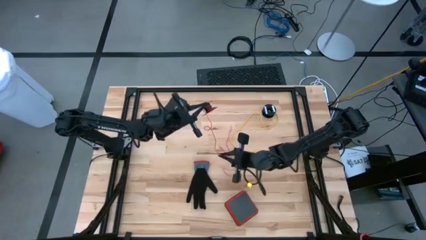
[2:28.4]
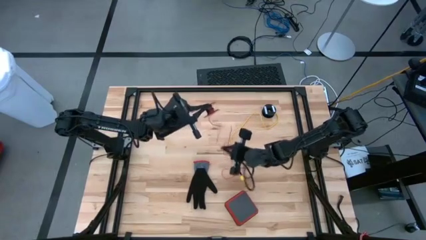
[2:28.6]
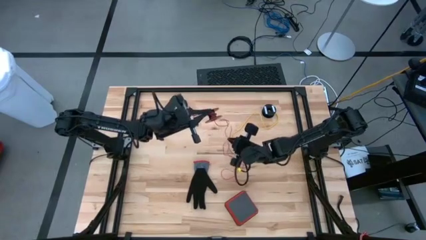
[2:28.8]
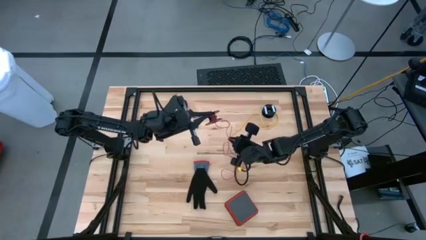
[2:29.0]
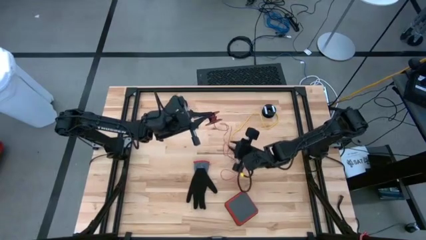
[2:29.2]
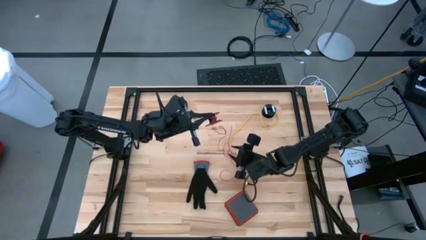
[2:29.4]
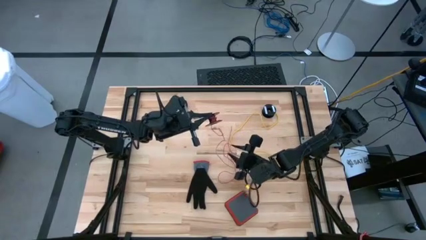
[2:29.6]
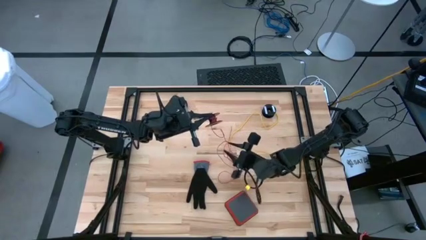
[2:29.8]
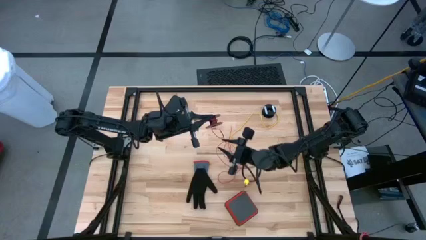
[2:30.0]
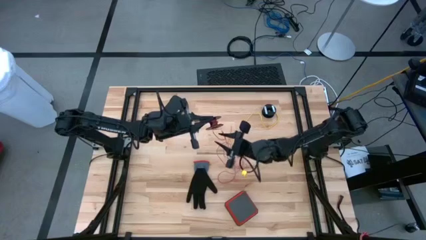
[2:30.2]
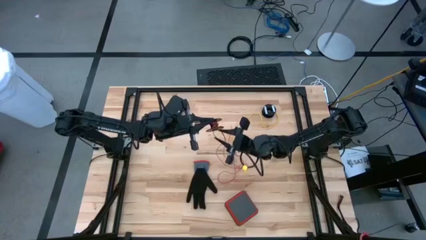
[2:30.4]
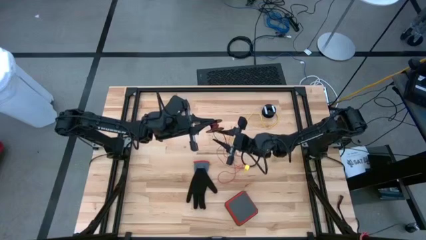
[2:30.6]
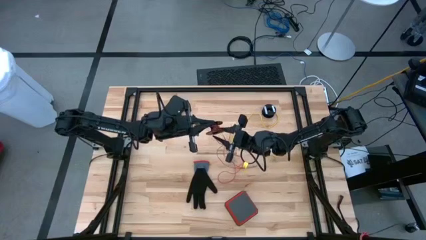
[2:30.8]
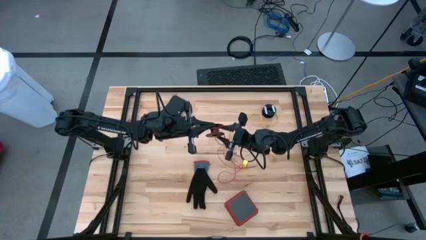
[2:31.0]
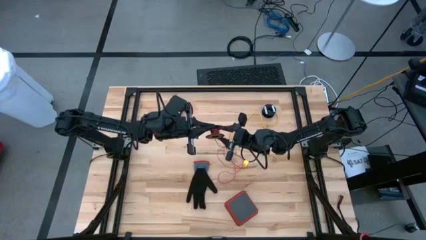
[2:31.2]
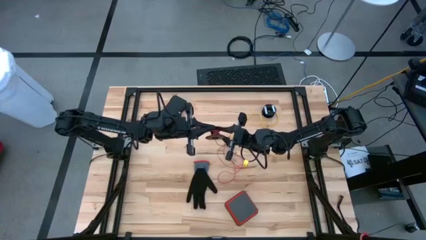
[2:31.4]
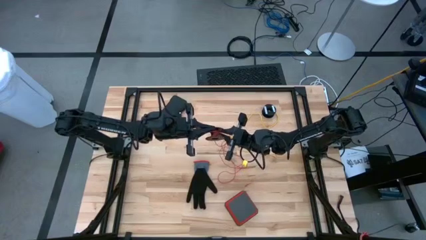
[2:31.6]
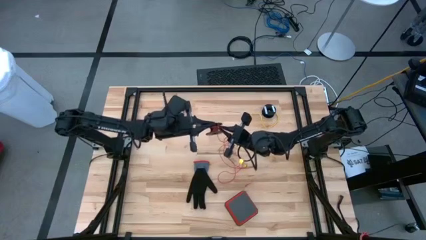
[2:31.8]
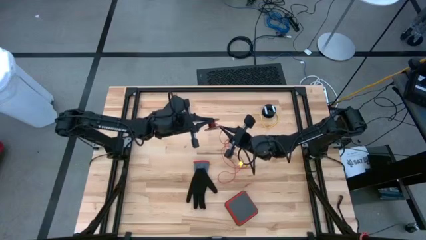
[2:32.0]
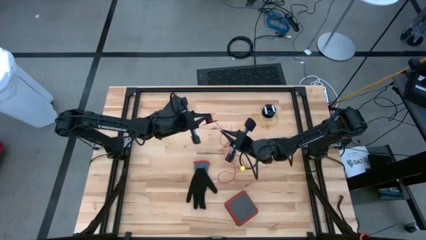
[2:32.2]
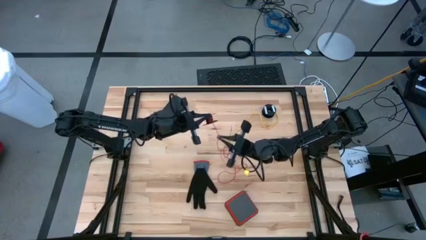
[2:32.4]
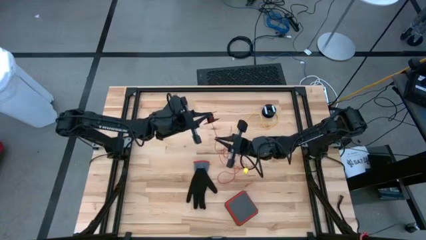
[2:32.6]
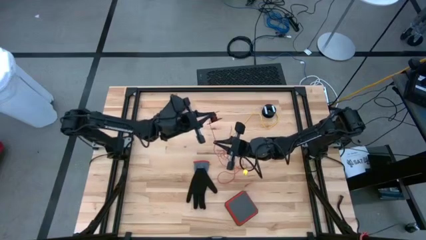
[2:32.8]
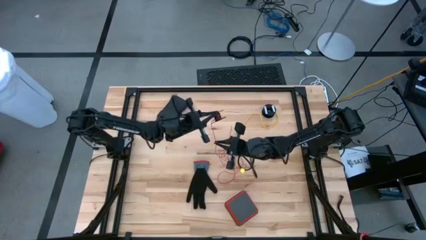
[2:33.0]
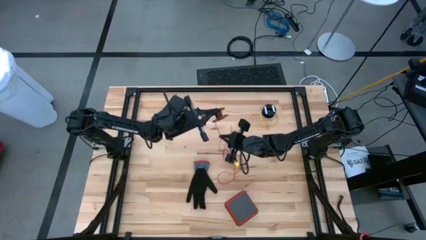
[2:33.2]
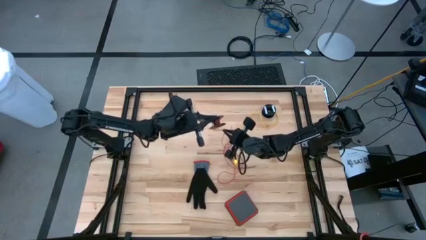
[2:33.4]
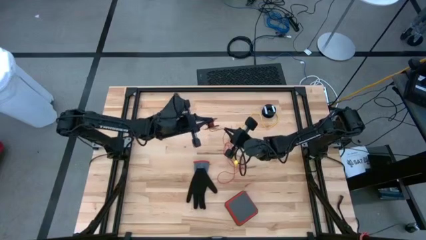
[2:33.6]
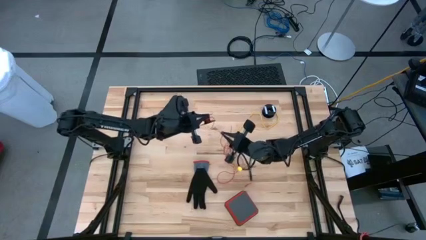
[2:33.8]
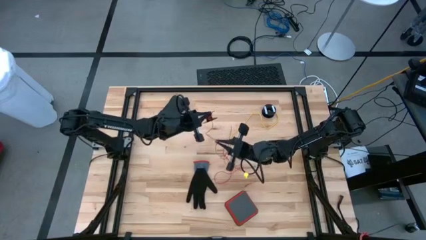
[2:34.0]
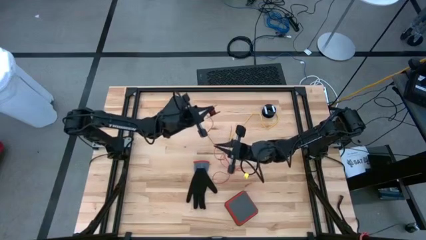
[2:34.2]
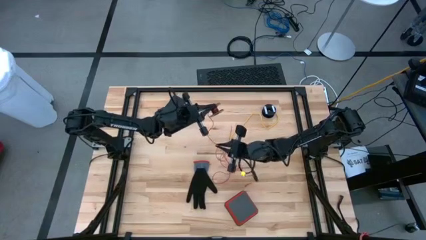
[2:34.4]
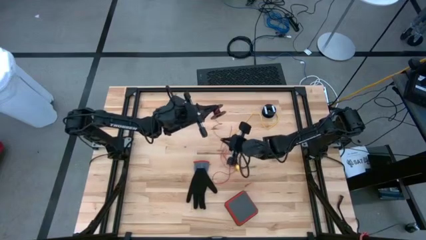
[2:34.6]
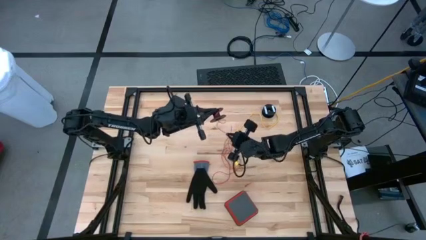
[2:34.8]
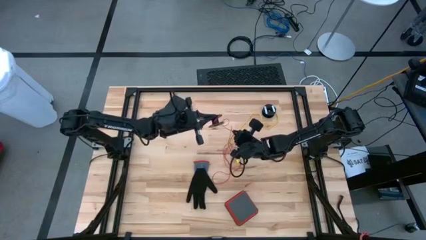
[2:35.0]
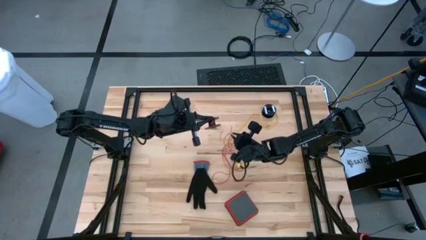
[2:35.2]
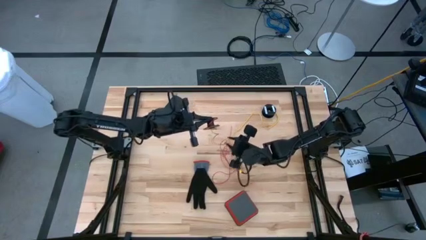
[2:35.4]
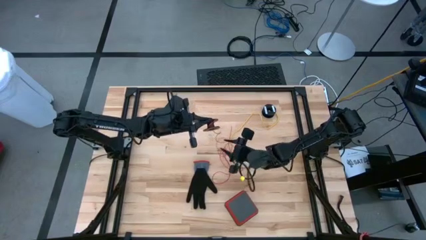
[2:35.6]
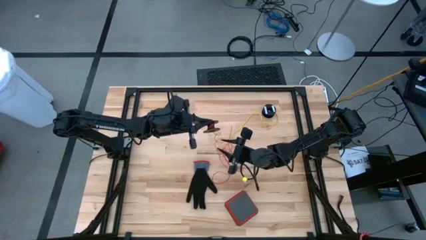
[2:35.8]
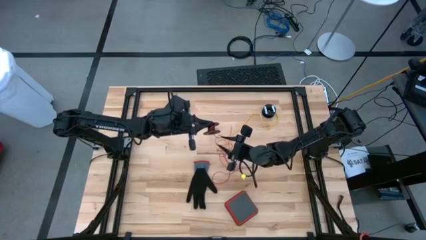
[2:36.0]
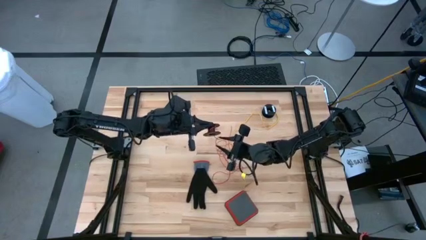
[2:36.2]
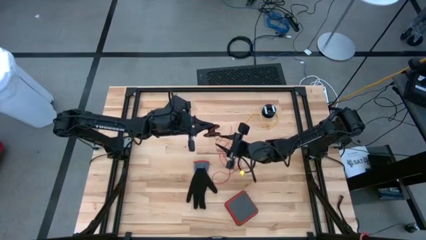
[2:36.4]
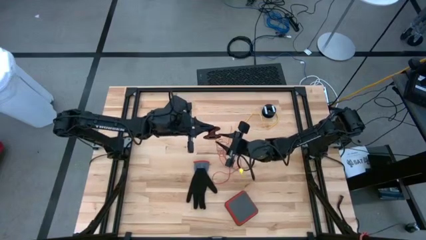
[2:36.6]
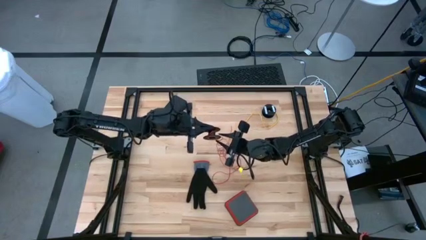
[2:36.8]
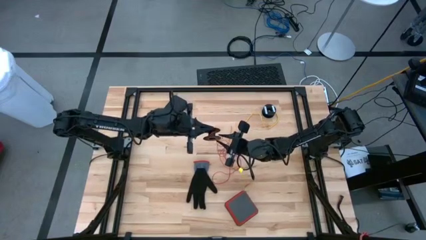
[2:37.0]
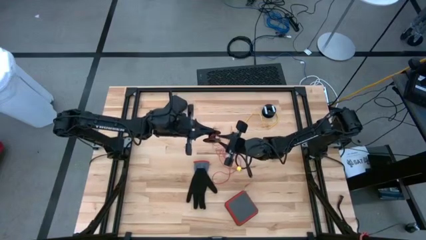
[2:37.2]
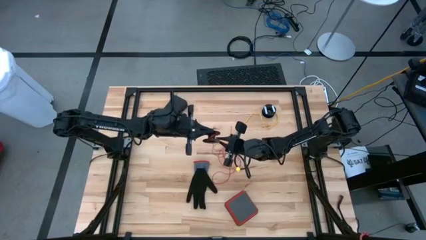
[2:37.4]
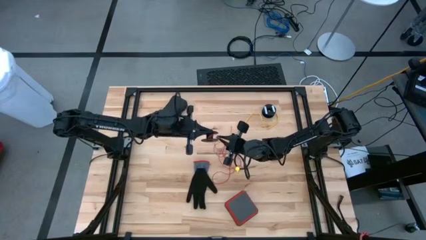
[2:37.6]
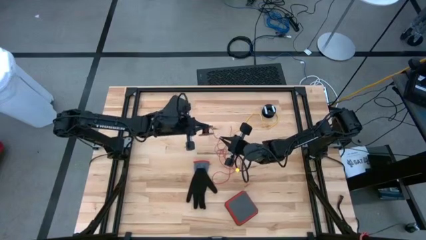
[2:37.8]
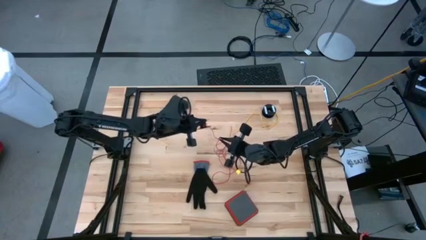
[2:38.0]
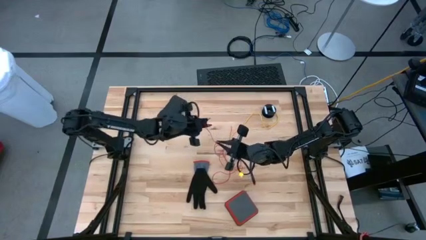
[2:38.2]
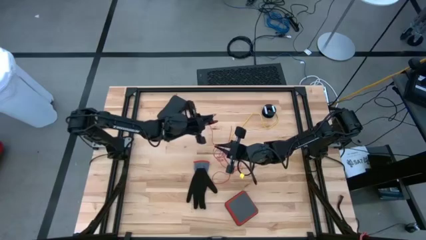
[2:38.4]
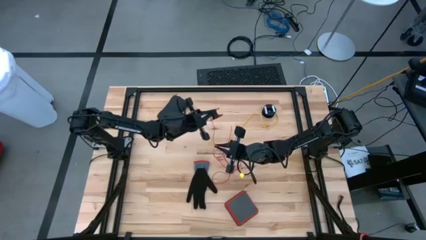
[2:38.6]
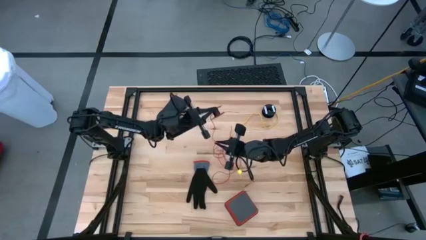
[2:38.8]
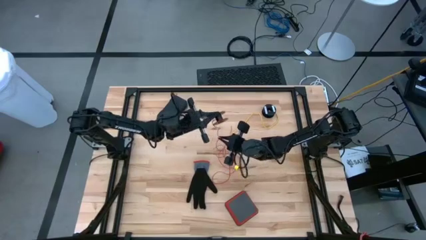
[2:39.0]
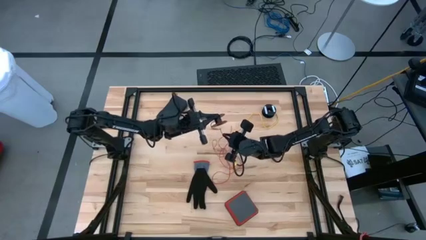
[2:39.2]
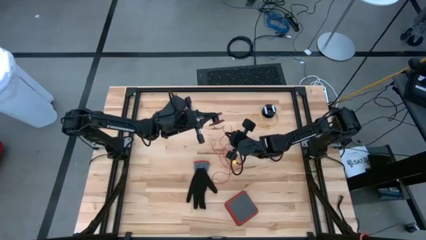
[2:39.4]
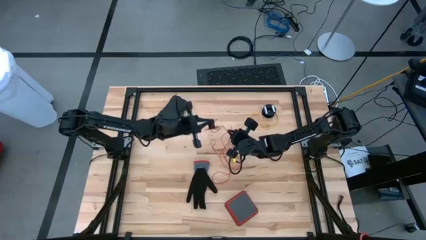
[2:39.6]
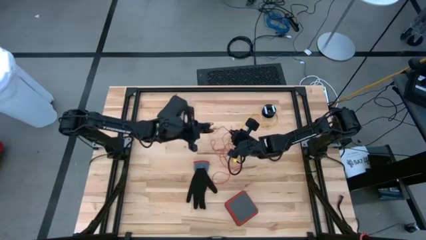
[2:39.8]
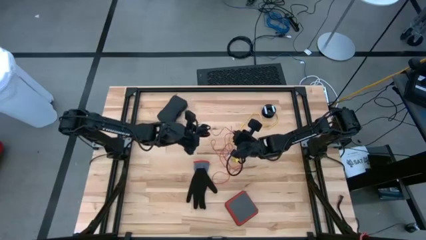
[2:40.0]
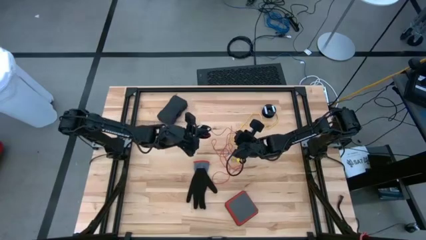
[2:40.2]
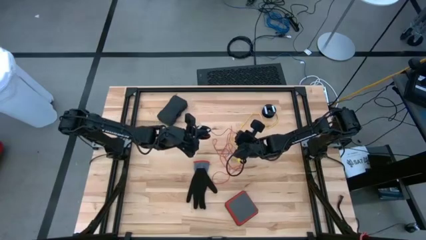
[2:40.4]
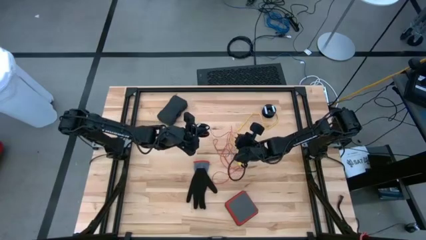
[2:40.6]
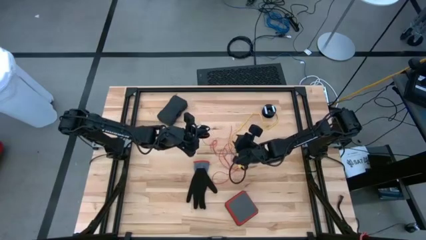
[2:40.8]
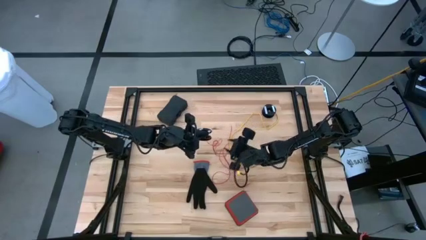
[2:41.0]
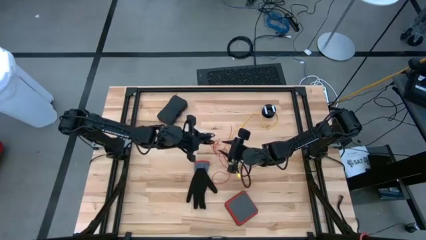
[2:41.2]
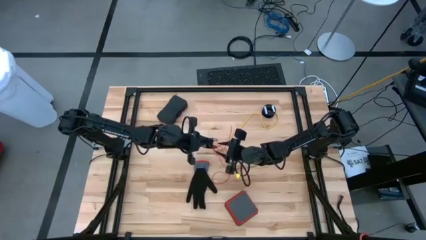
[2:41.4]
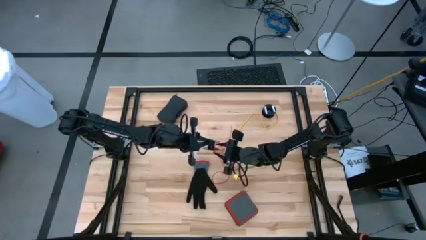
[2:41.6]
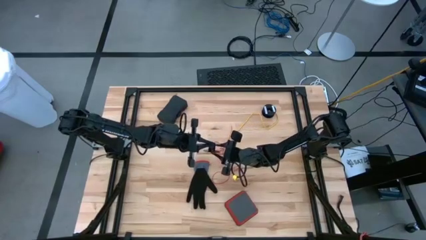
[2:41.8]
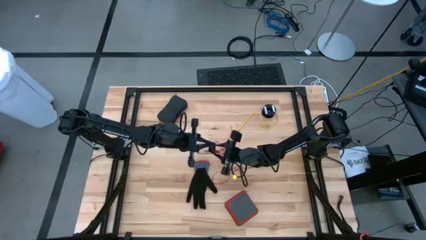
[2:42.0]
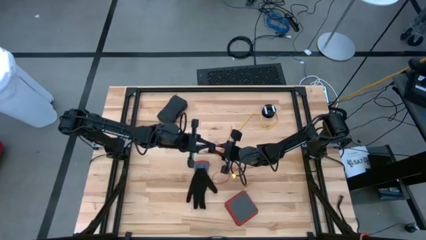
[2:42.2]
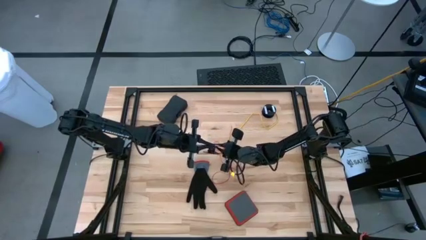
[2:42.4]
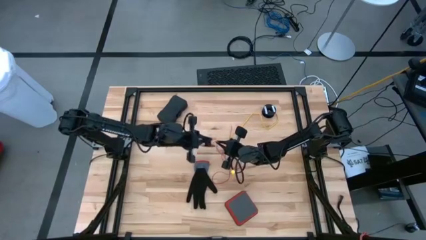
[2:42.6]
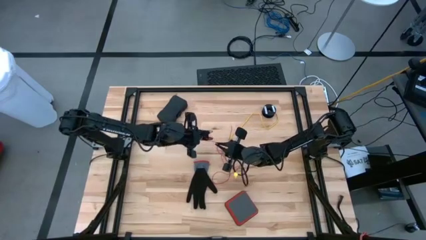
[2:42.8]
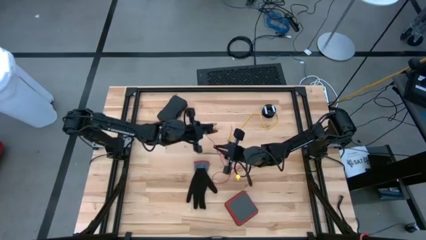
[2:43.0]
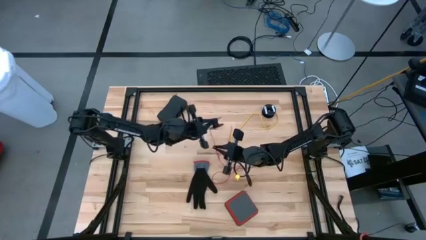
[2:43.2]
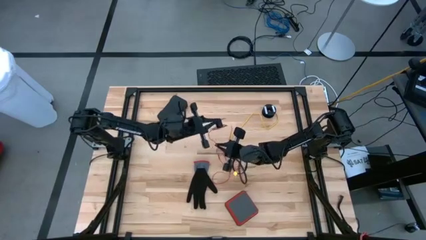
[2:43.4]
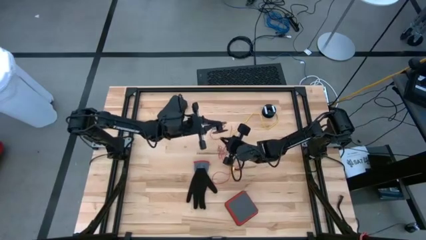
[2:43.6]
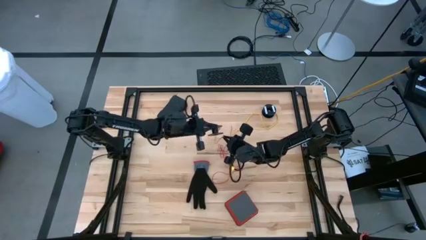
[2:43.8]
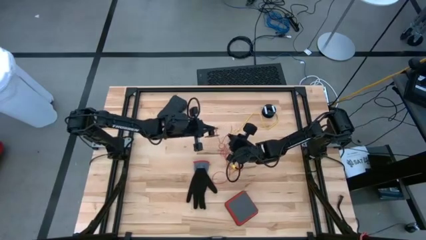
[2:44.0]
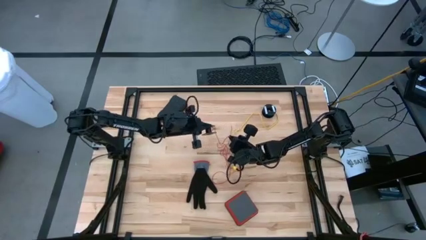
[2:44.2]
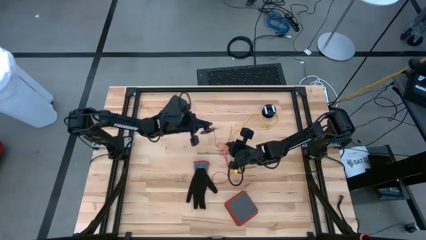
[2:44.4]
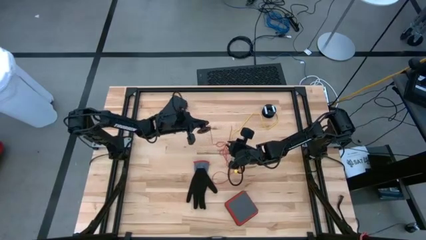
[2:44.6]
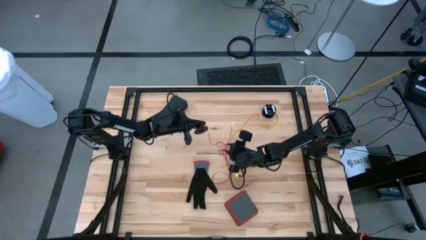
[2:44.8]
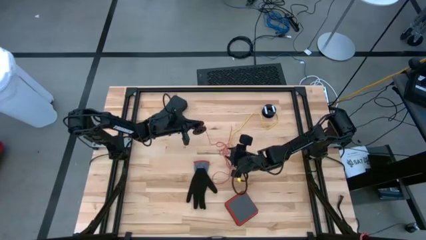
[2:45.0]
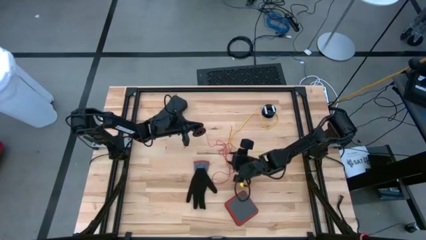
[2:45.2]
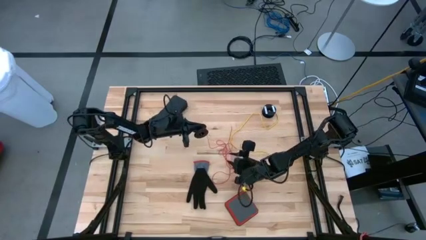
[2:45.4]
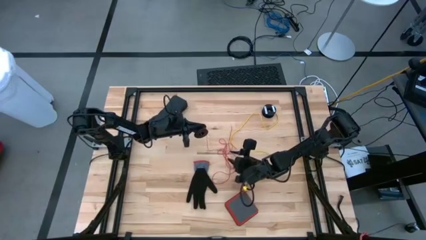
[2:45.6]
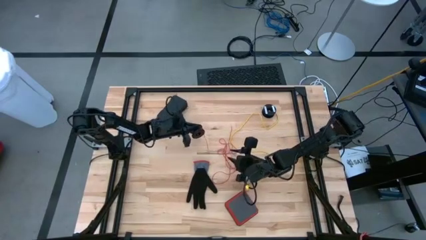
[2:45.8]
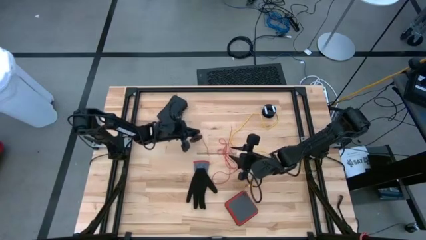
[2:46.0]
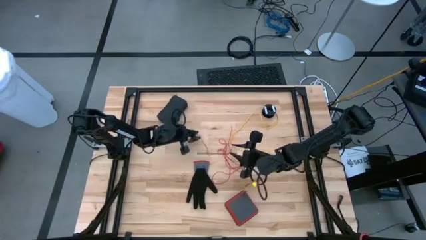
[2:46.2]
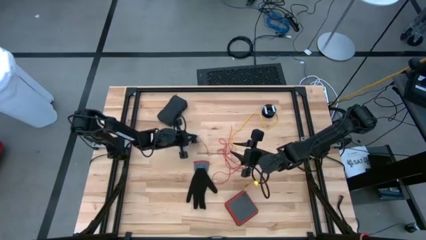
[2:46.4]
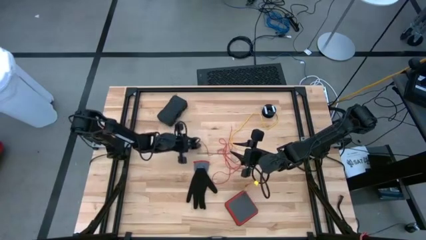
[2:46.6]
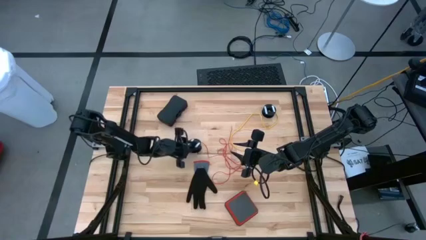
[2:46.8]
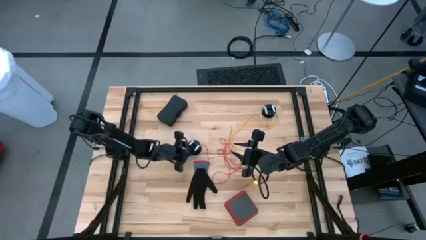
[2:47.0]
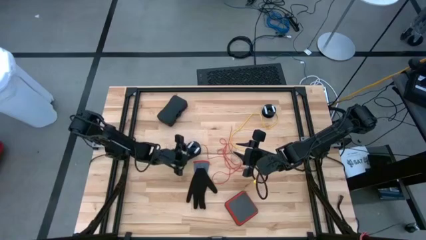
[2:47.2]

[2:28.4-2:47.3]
Task: Coil cords
Uncoil the red wire from the black spool
